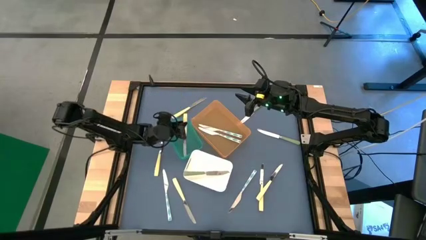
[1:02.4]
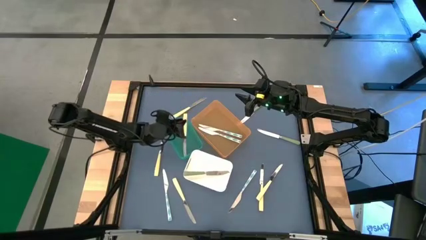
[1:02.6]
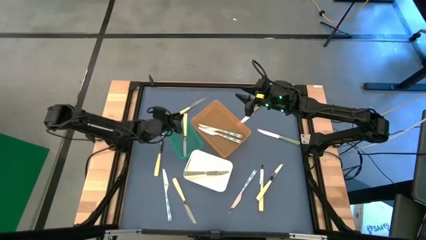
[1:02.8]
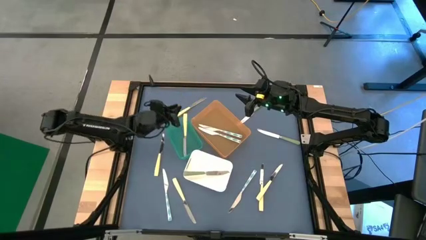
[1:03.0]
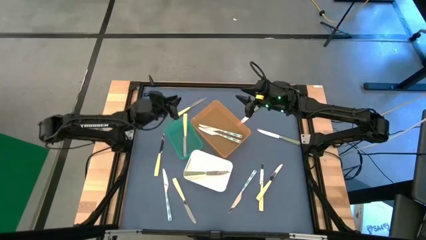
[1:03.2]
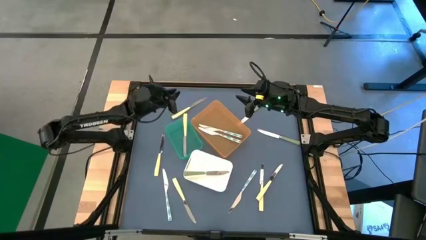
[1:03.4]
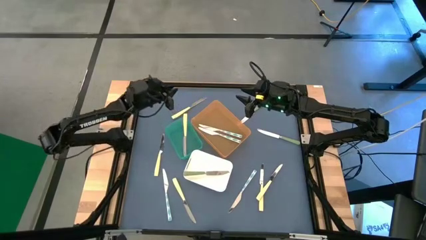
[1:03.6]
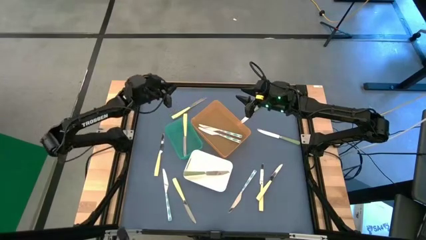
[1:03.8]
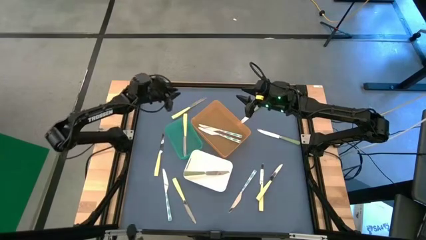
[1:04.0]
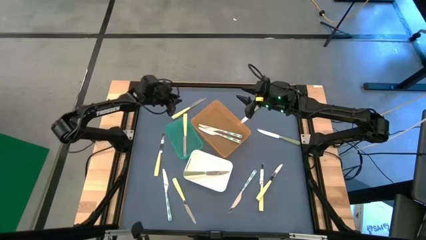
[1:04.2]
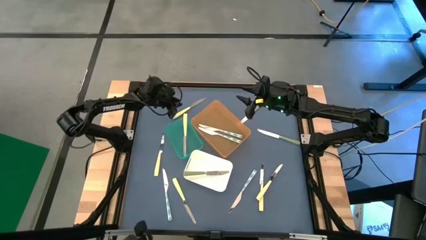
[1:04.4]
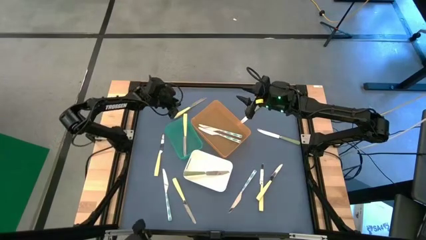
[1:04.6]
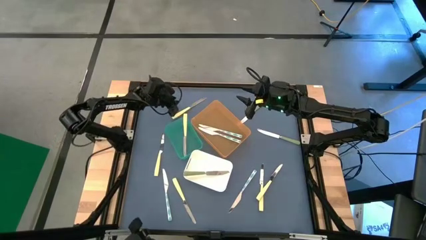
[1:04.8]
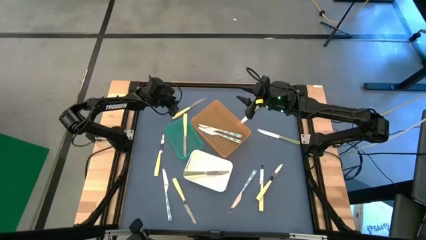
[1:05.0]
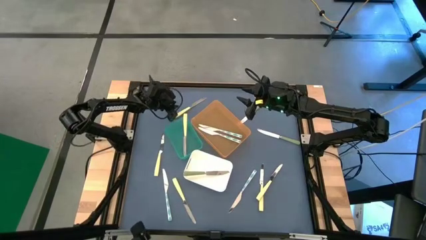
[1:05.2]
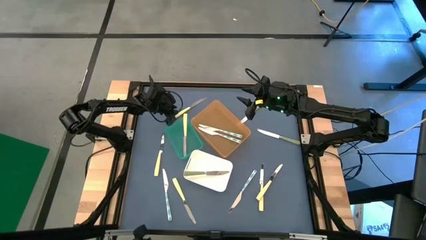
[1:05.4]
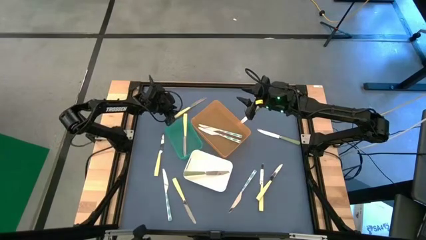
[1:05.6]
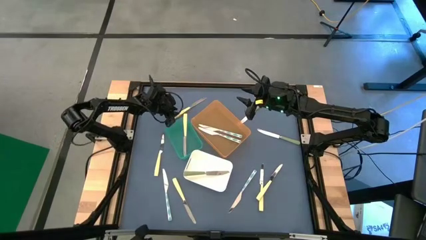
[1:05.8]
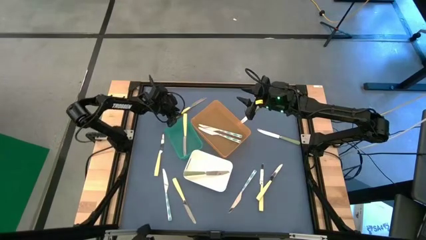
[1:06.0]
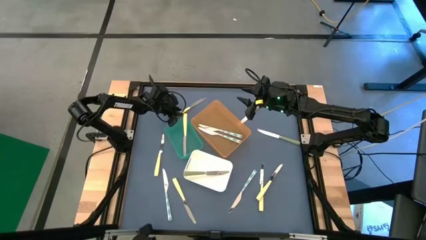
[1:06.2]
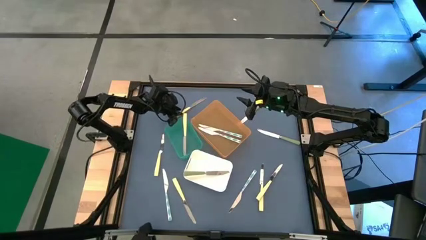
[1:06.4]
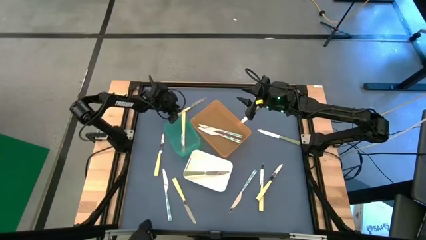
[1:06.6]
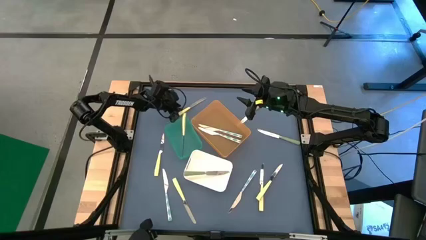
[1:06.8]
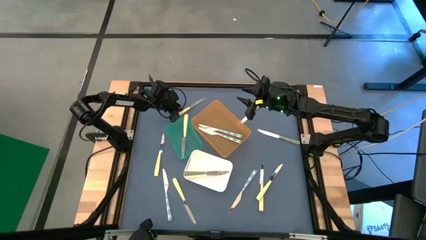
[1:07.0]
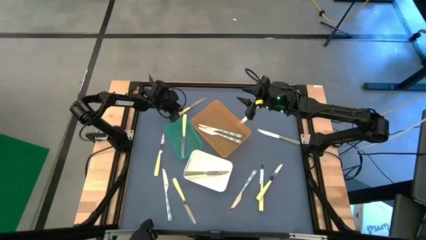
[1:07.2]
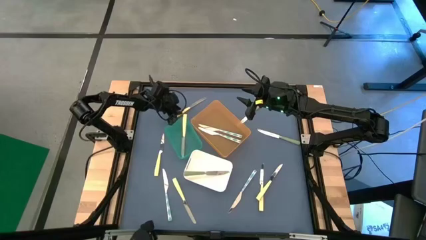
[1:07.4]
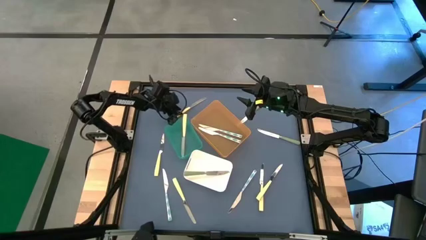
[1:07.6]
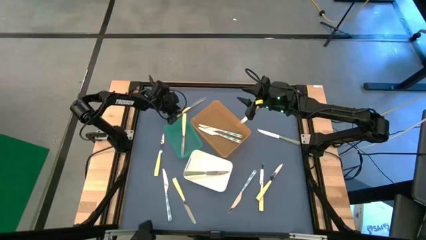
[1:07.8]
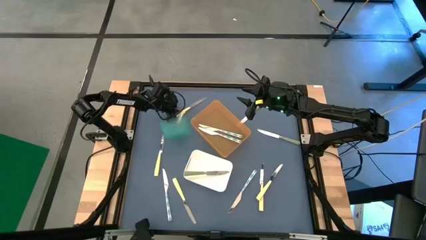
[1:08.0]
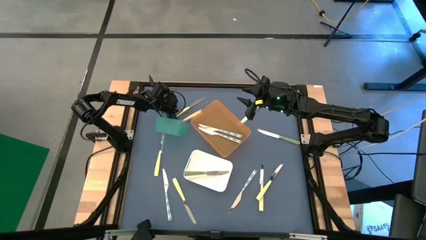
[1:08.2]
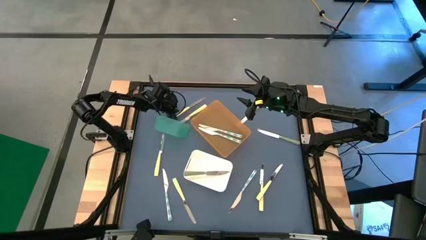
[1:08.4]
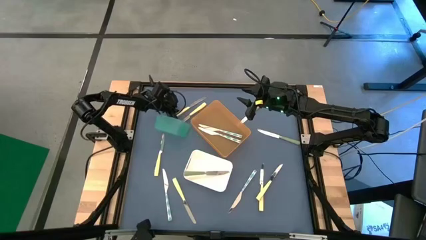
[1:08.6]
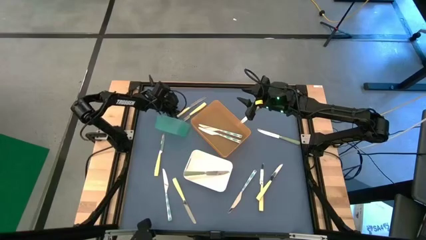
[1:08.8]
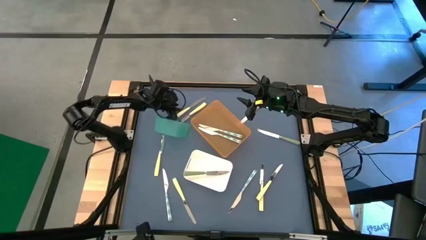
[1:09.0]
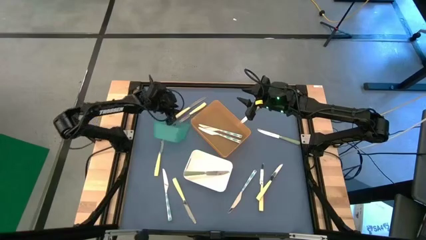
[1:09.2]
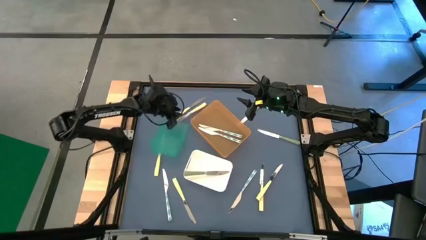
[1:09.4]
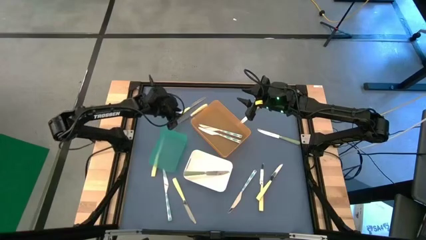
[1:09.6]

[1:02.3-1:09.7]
Task: Sort silverware by color (type)
Put the yellow table knife into the green bin

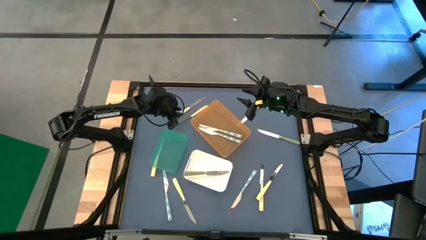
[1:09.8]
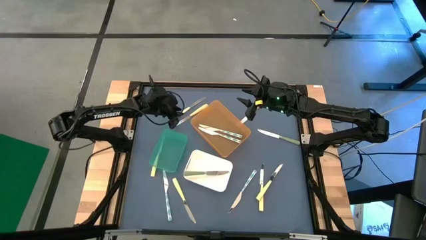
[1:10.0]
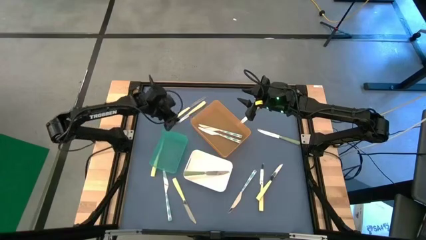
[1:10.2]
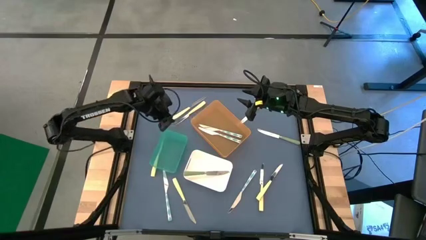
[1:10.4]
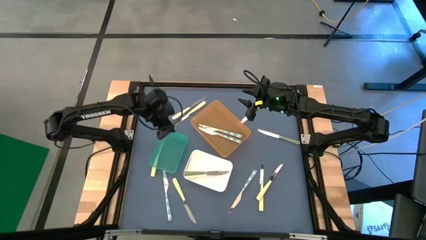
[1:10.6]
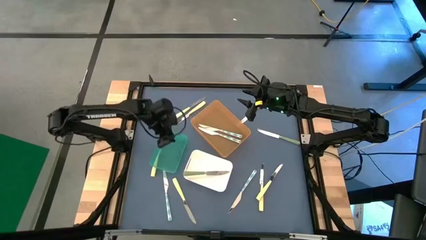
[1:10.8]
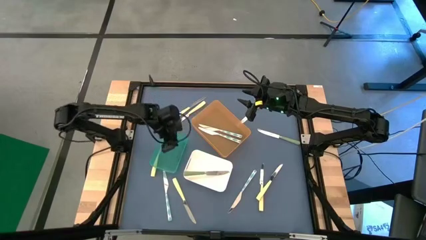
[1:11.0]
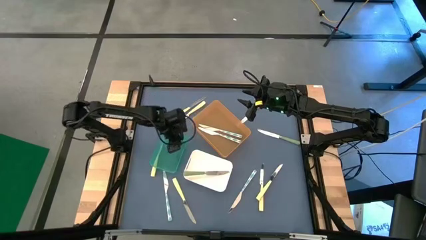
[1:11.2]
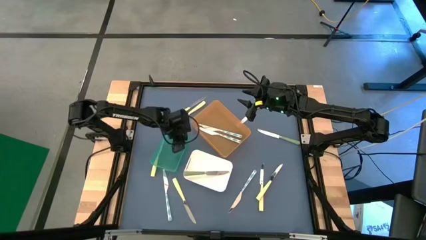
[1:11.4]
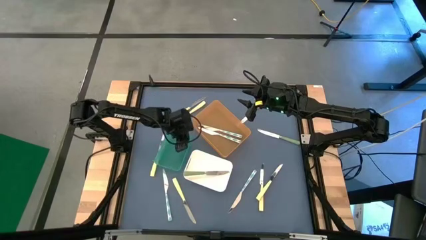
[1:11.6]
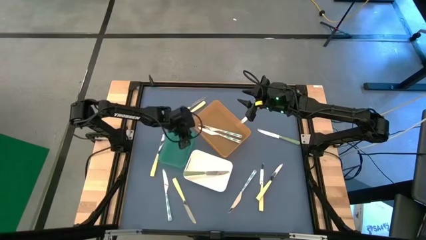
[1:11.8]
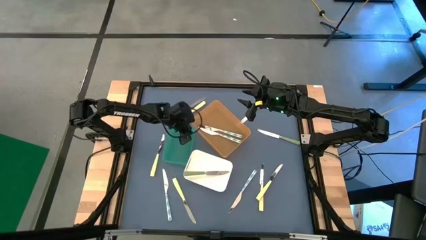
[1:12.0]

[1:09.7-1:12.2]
Adjust the green bin

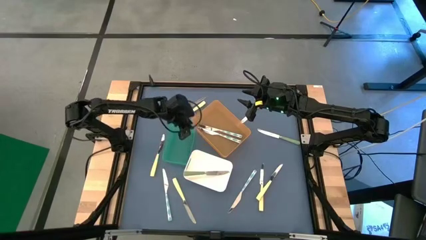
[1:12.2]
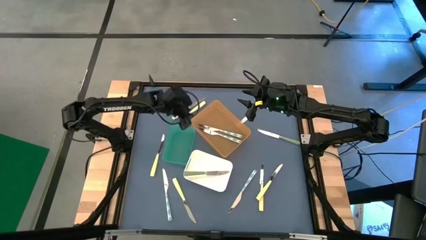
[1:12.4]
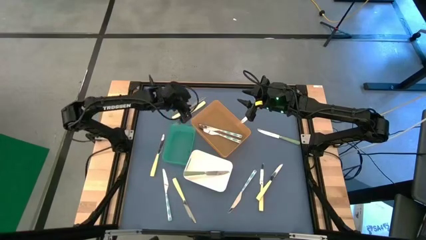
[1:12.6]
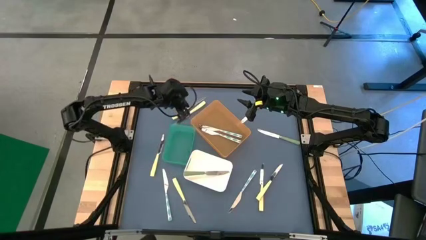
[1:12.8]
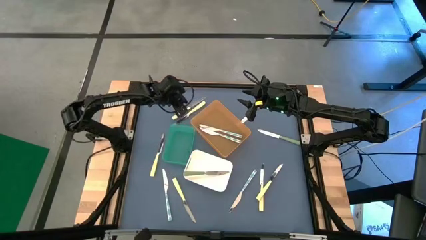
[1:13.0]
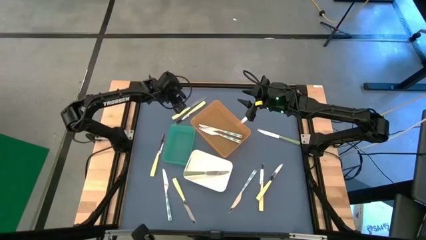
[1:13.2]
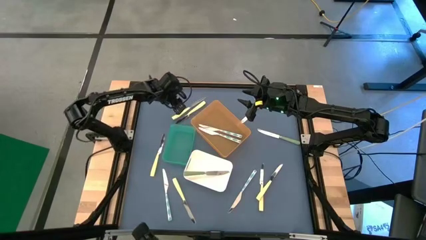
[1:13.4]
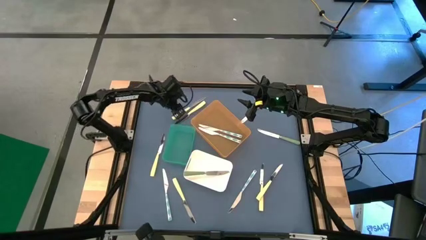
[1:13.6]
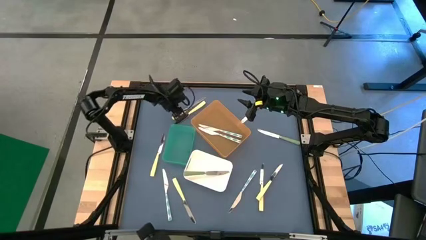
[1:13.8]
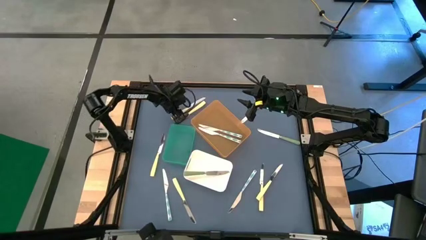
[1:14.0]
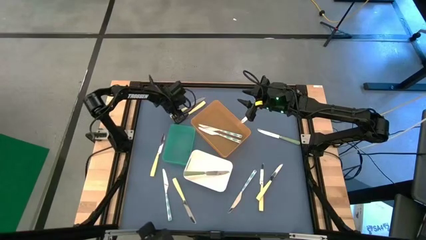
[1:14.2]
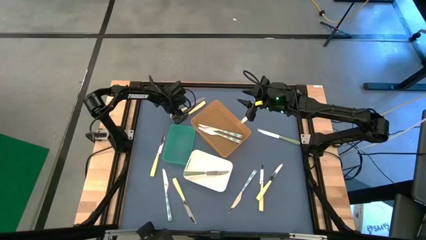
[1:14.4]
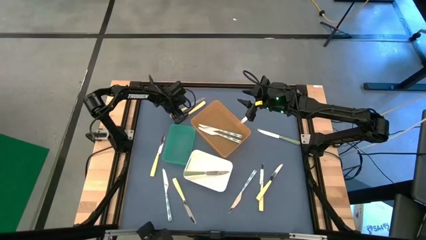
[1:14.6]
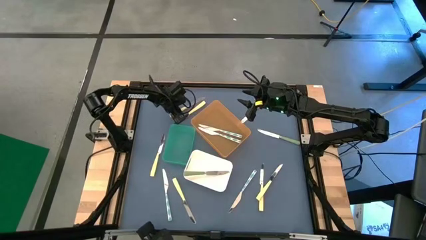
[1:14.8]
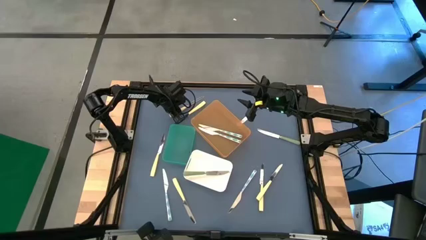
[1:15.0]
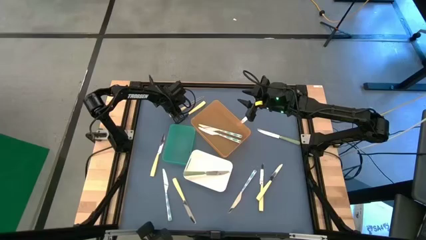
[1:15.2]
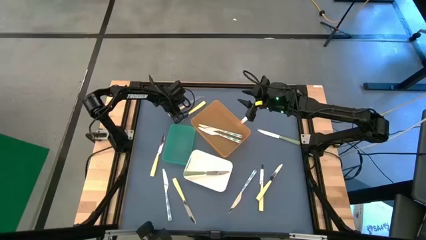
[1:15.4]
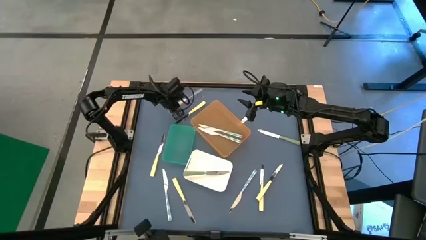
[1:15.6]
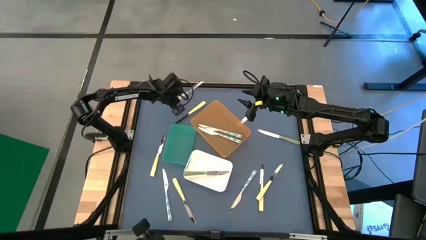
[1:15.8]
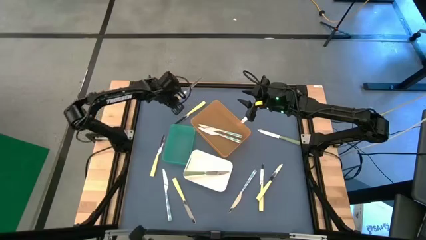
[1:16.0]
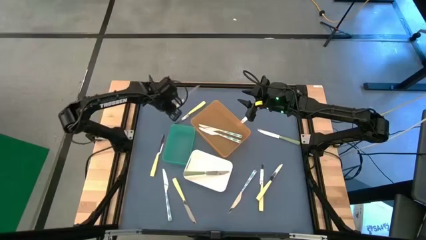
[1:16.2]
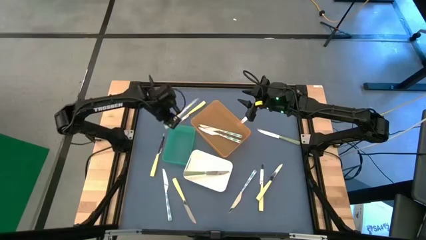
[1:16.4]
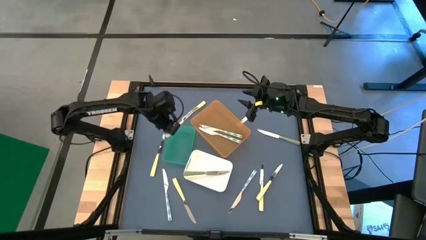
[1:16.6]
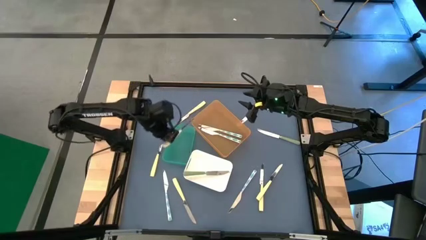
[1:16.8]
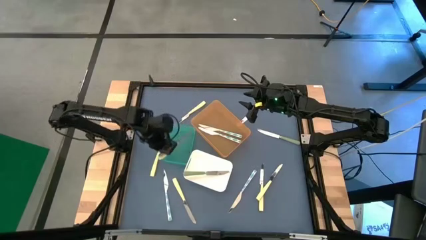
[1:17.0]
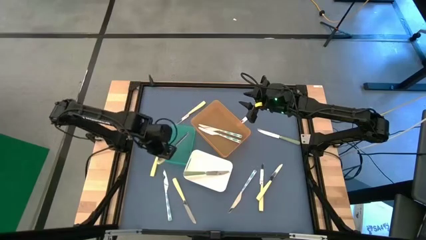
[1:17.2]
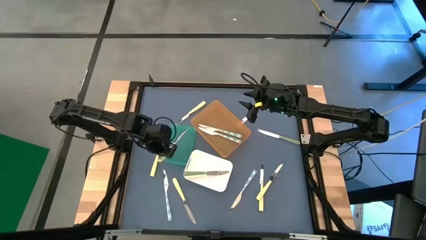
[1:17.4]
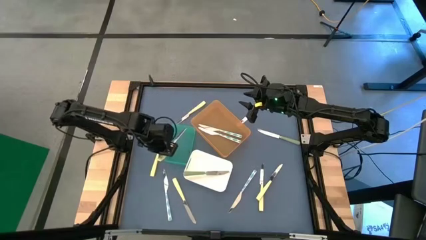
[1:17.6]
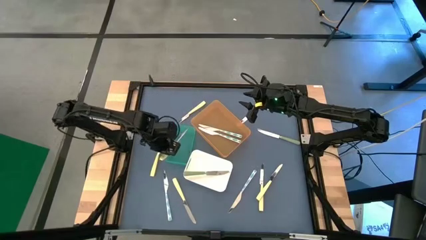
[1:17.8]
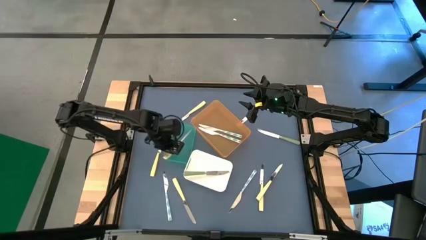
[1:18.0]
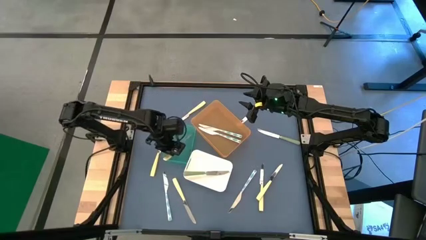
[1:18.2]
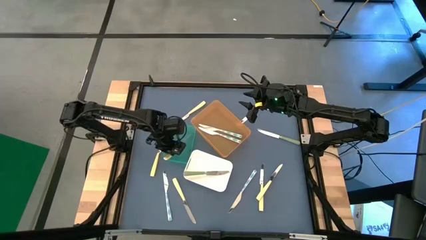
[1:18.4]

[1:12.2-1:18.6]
Put the yellow table knife into the green bin
